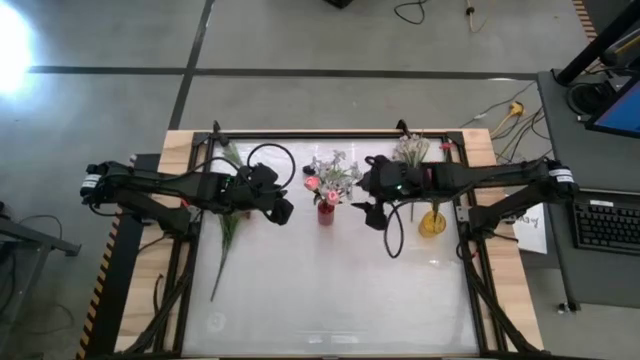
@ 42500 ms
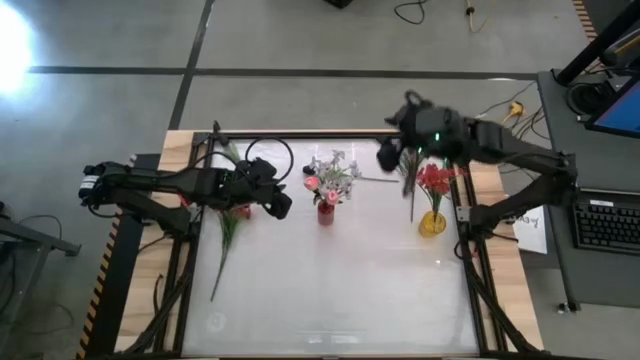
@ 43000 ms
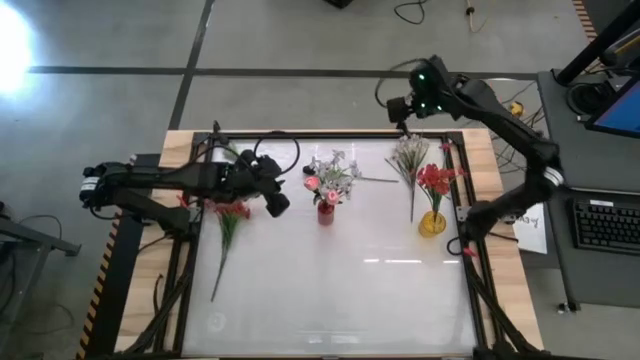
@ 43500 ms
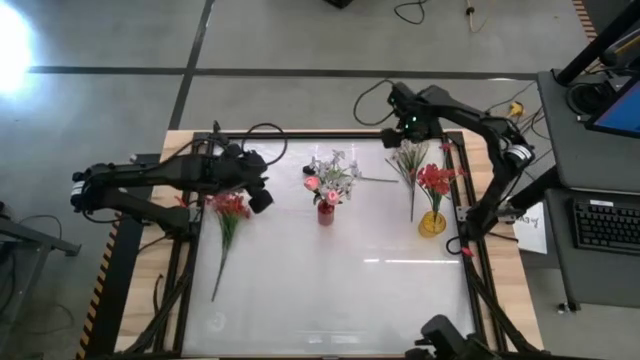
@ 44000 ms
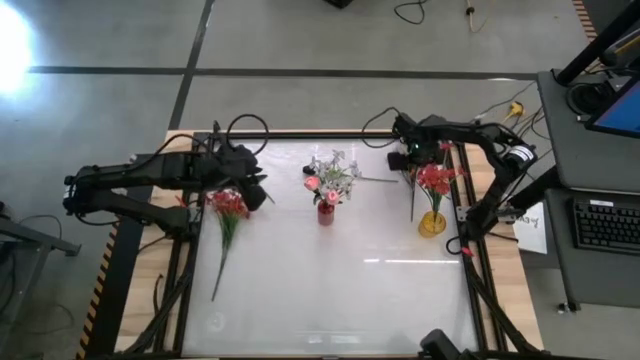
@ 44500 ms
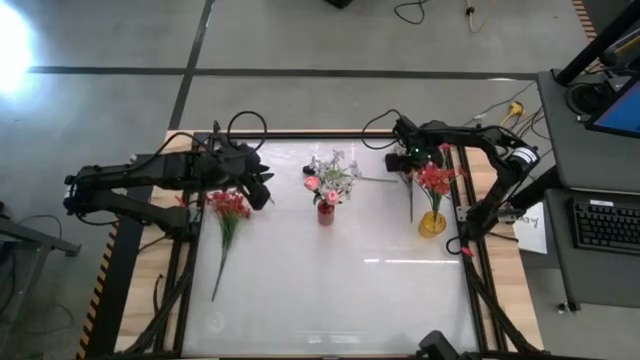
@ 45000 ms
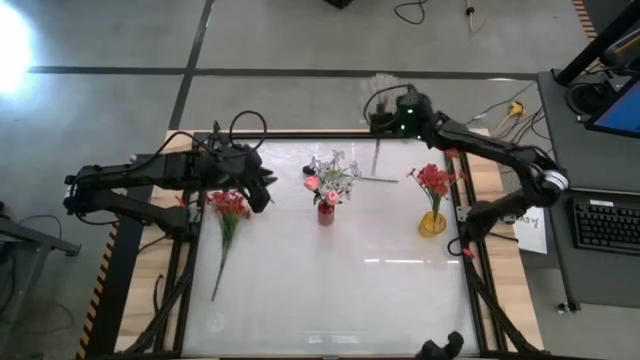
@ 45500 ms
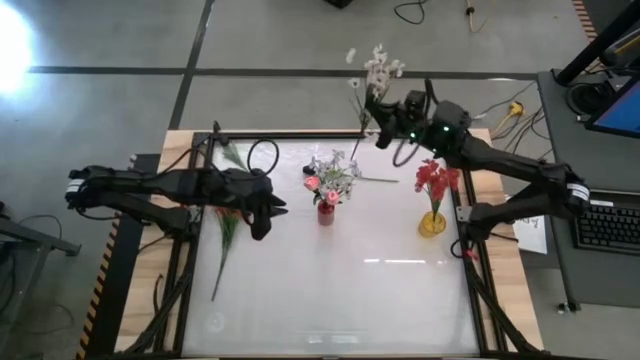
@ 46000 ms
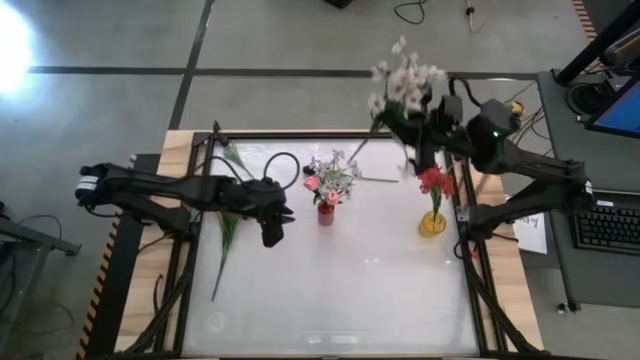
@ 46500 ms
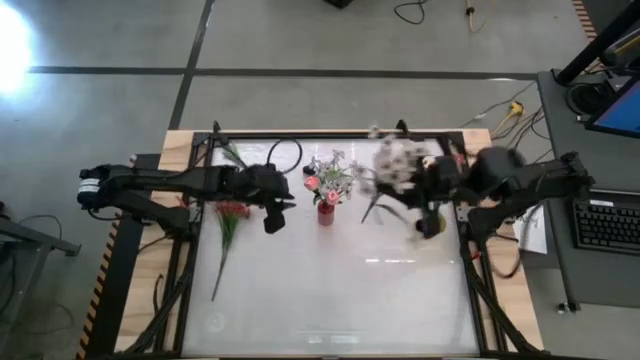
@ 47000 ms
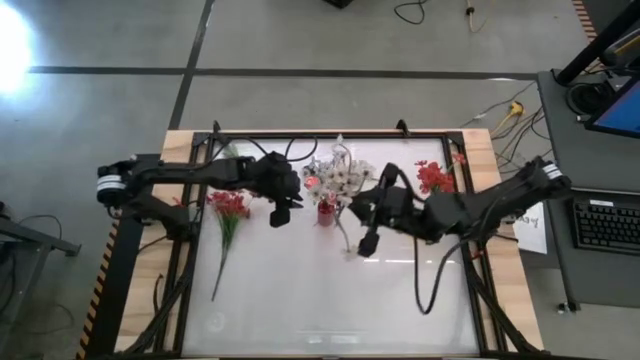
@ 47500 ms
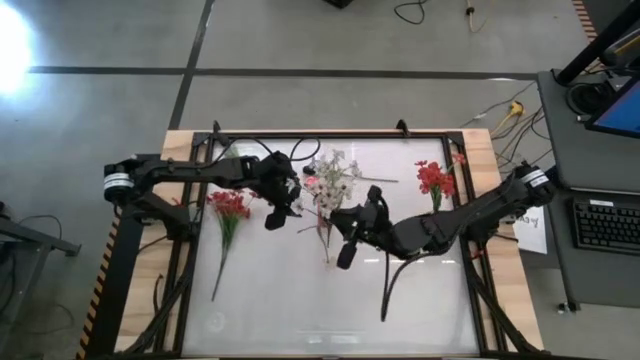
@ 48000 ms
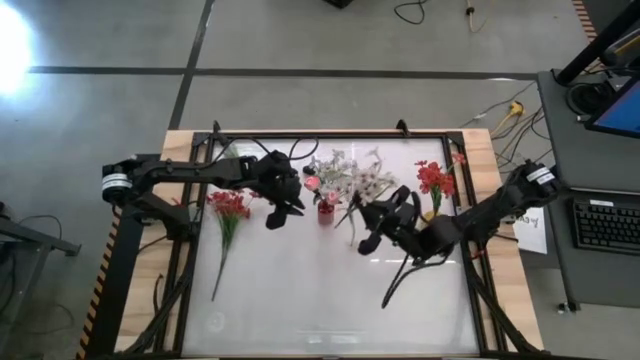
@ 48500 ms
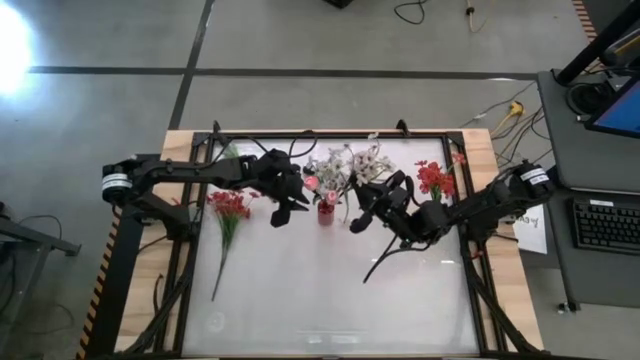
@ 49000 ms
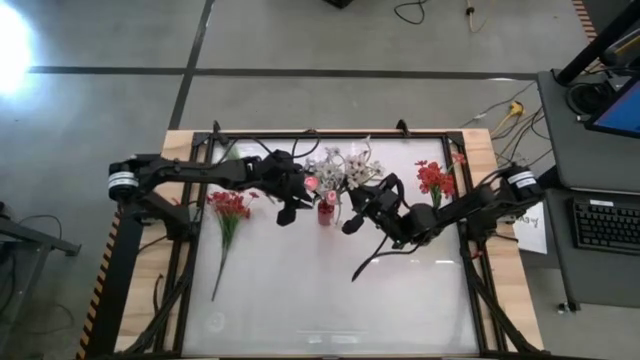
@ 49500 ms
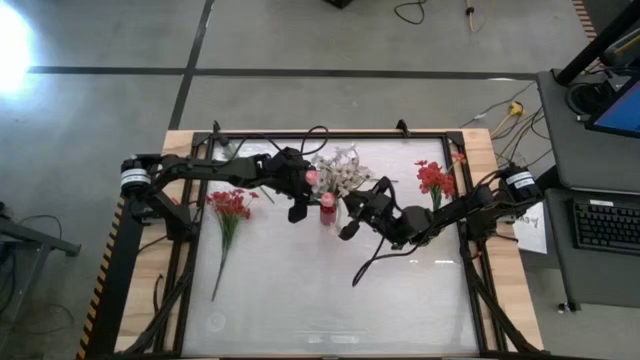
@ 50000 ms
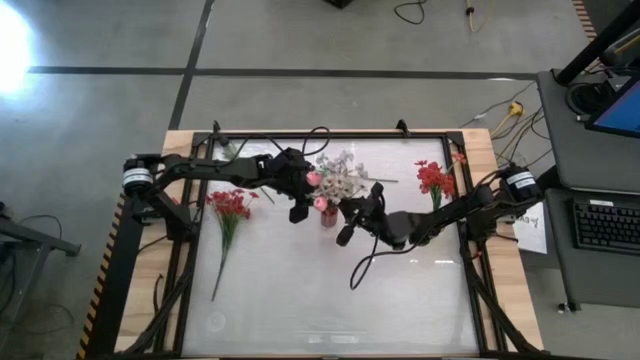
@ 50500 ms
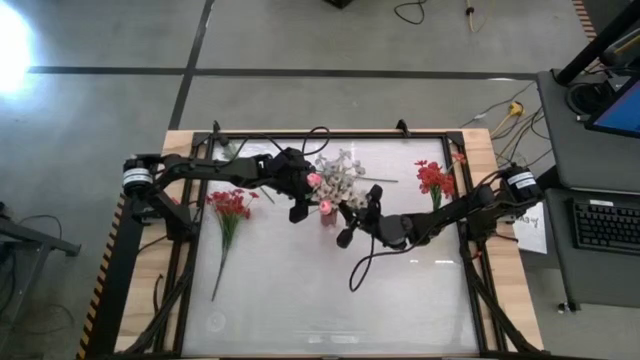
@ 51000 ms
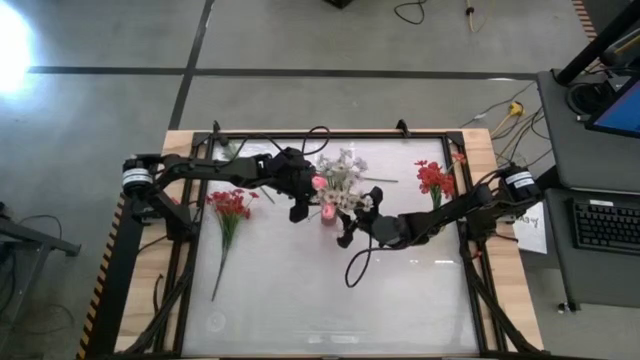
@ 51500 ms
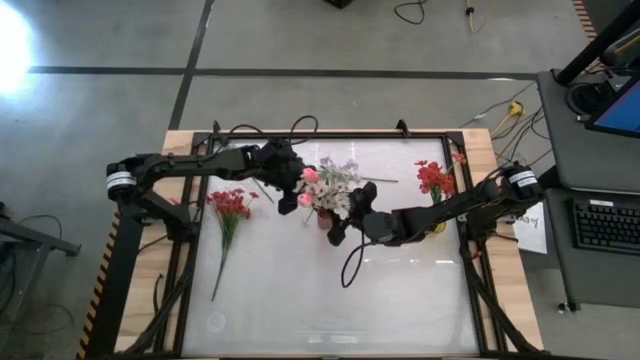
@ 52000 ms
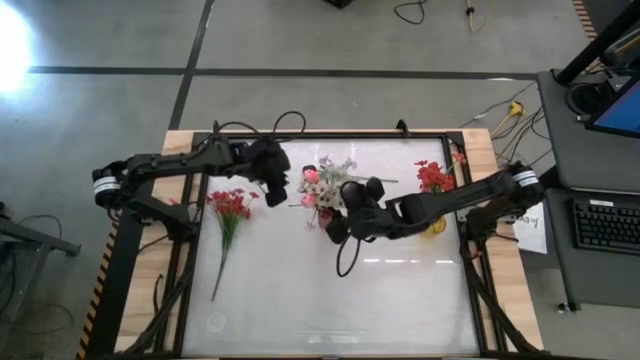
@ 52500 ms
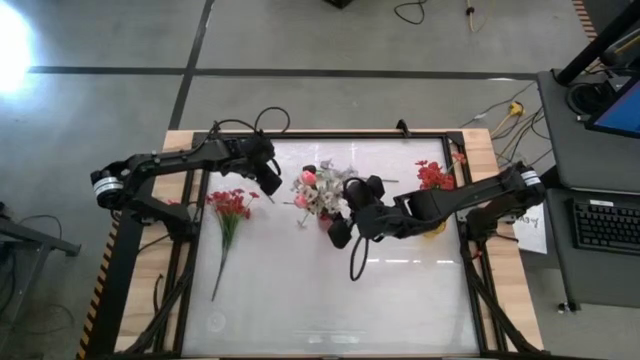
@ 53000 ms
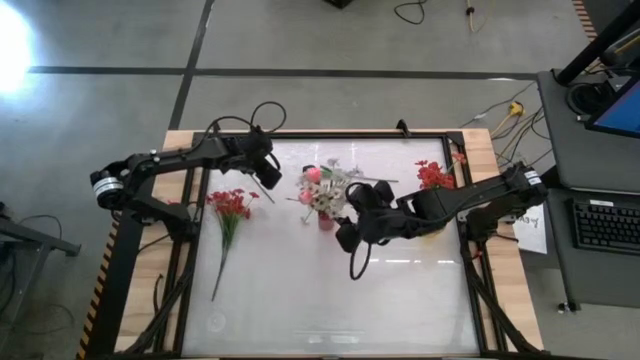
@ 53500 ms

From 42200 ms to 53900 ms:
Task: Sort flowers into vase by color
Put the white flowers into the red vase

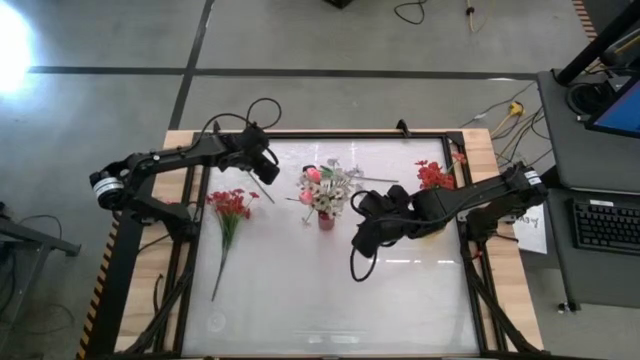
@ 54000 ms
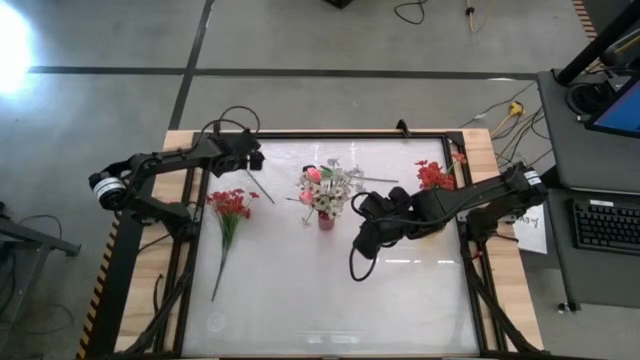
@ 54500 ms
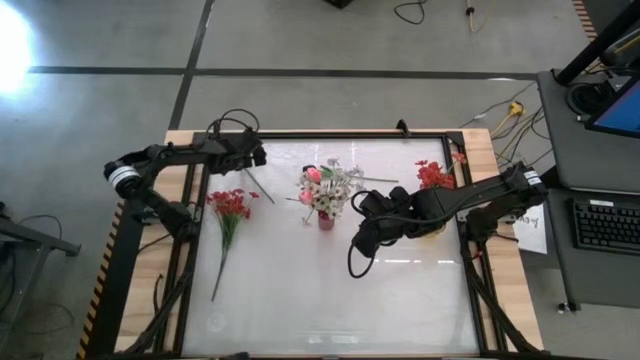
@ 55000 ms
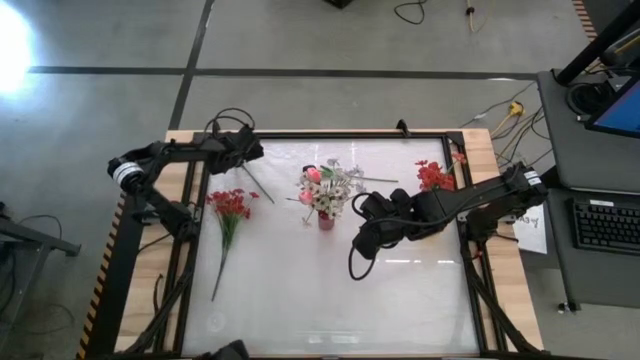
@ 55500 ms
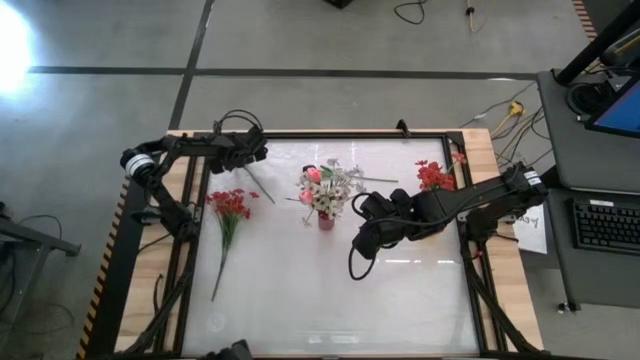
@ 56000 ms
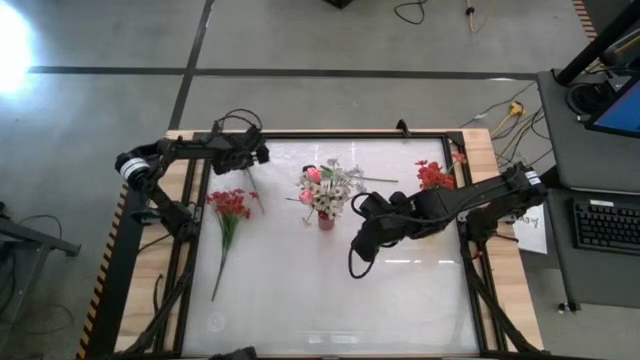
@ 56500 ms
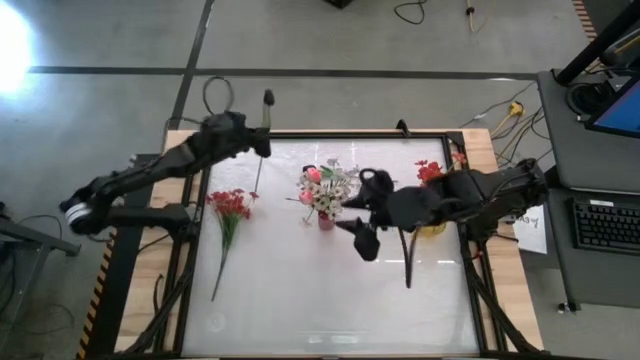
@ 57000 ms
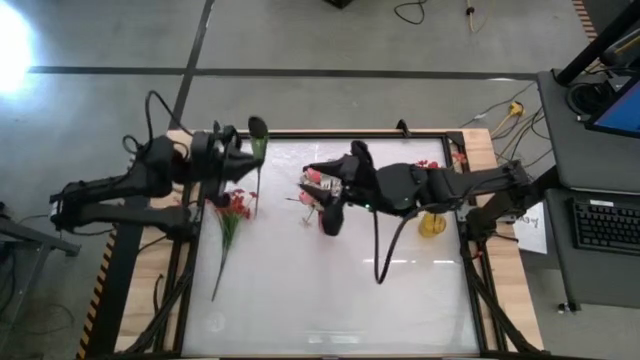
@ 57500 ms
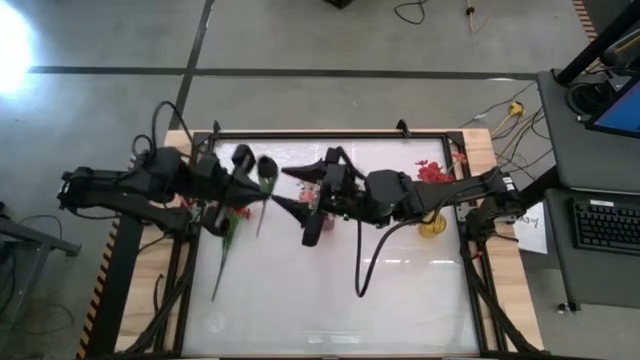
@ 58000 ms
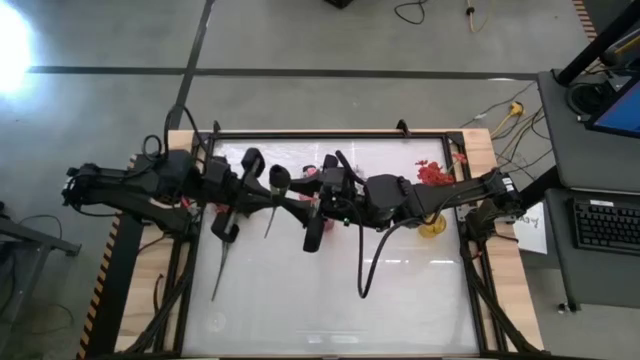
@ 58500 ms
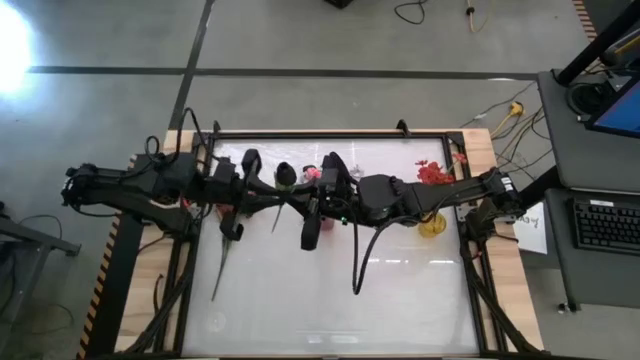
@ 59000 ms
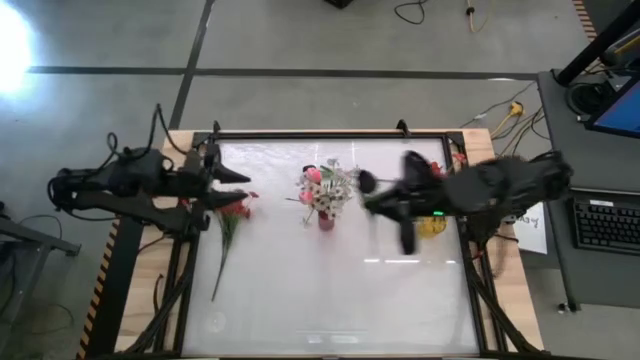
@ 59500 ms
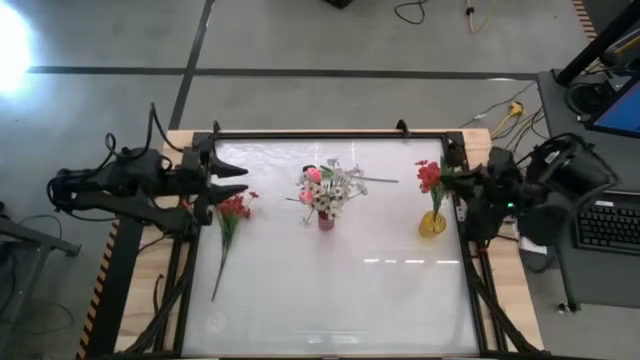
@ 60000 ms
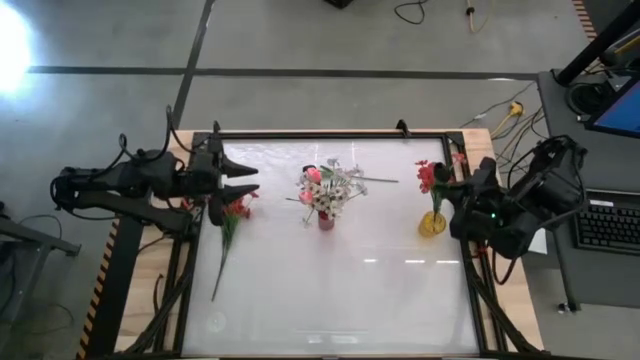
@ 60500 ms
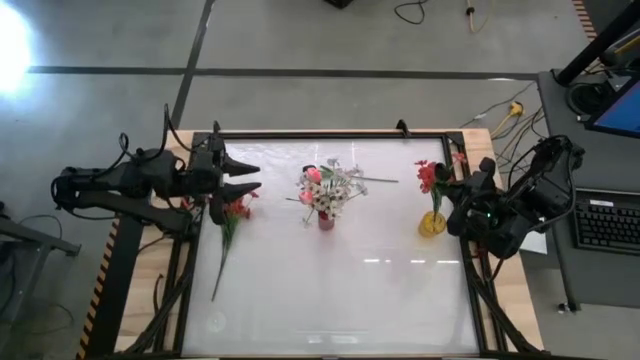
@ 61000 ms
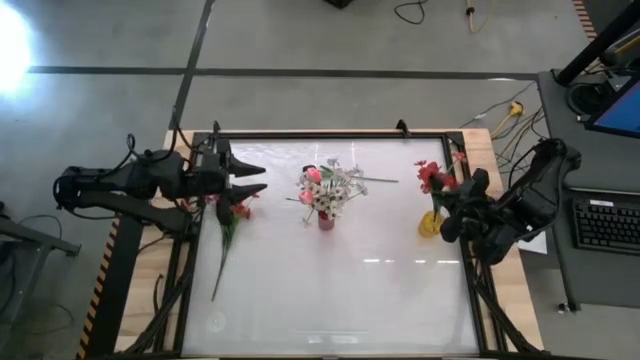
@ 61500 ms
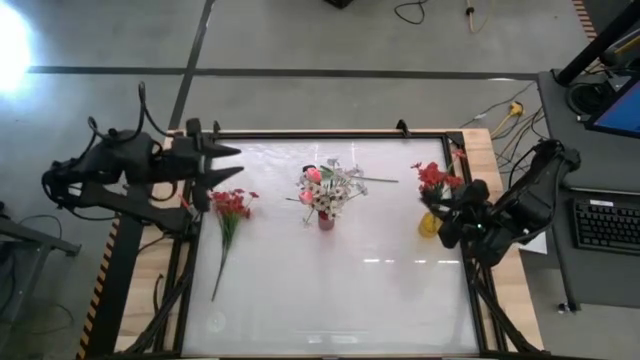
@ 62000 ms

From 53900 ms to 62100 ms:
Put the left black flower into the yellow vase

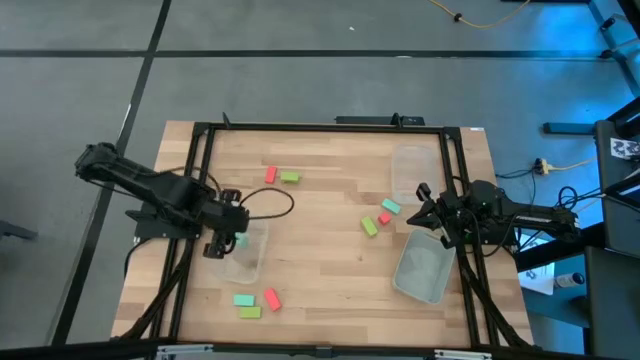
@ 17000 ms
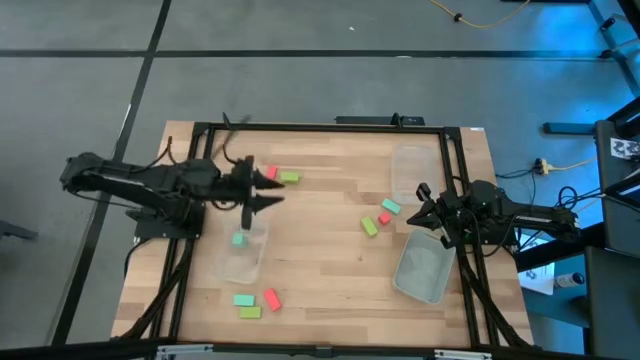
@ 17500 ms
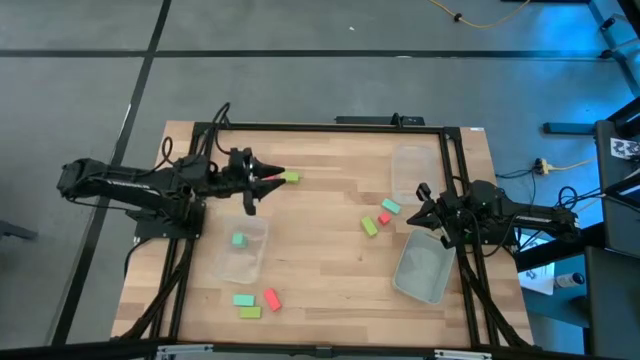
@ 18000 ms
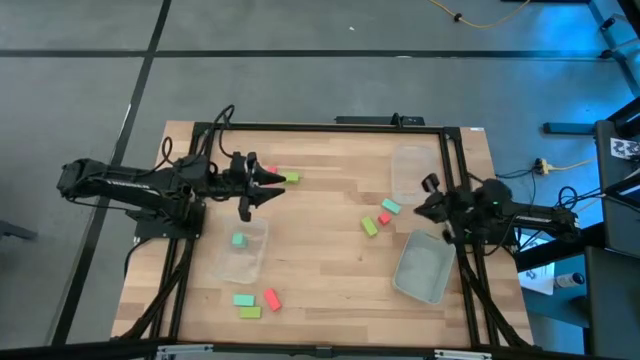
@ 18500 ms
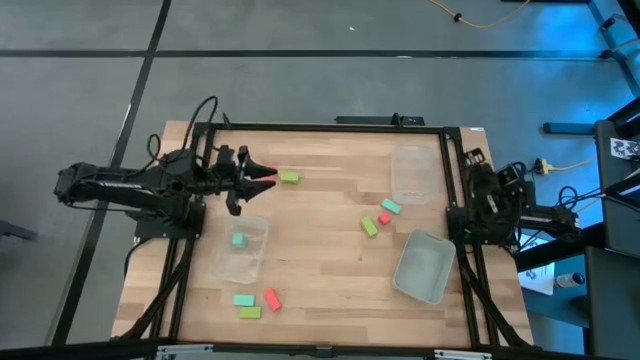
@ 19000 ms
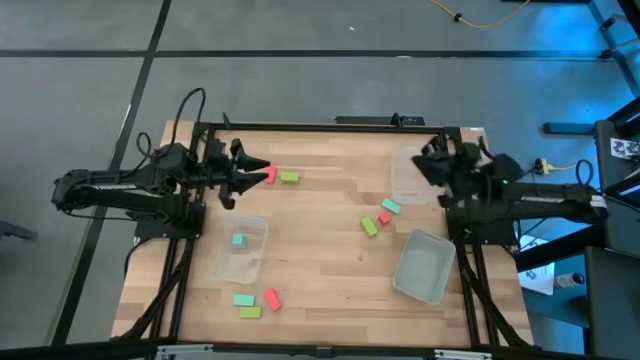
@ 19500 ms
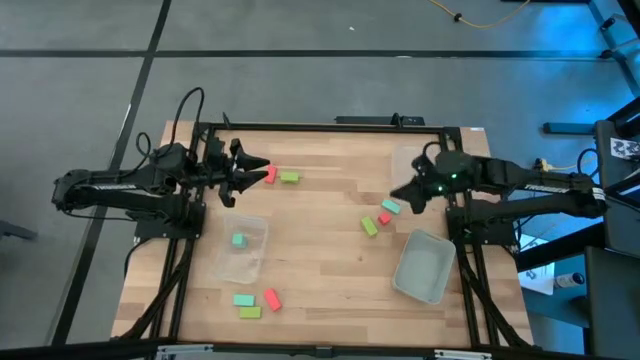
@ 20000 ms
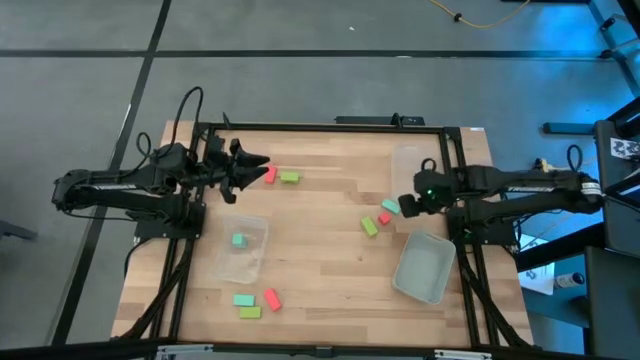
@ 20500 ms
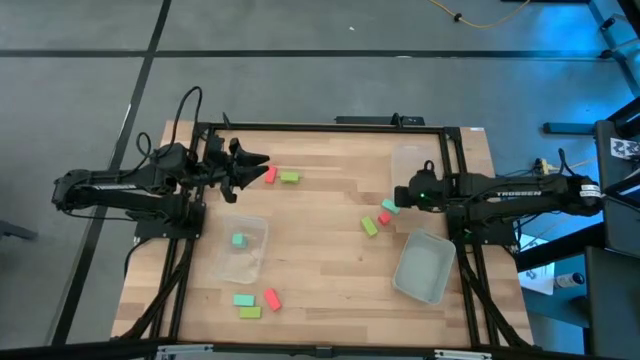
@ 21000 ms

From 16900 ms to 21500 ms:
Task: Sort & place blocks by color
Adjust the right transparent bin
